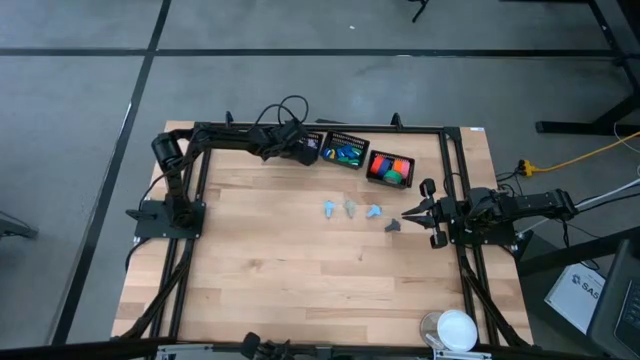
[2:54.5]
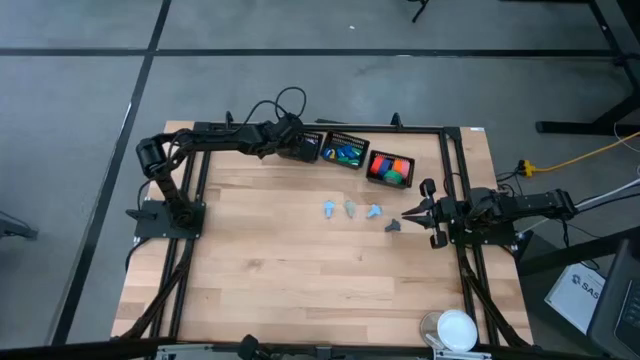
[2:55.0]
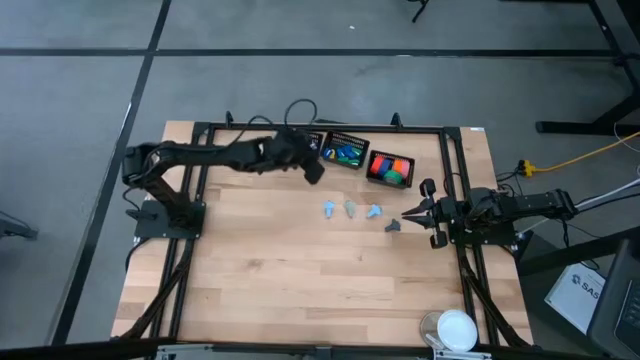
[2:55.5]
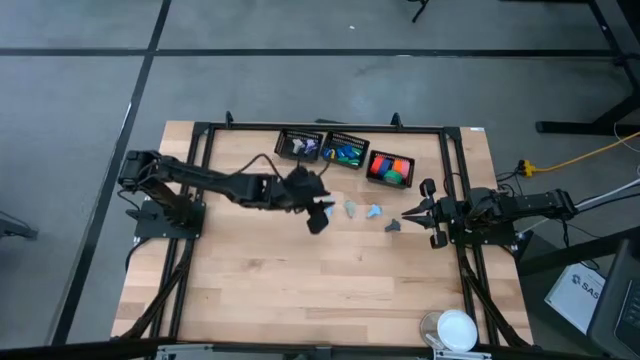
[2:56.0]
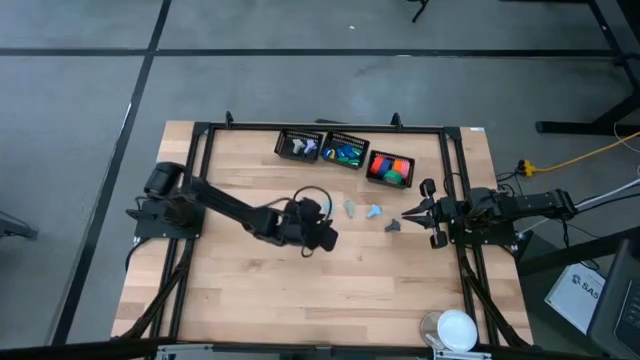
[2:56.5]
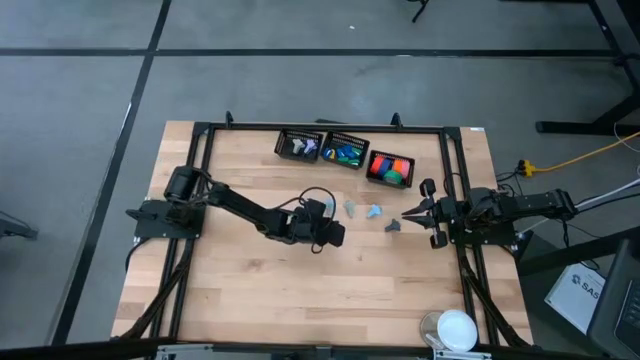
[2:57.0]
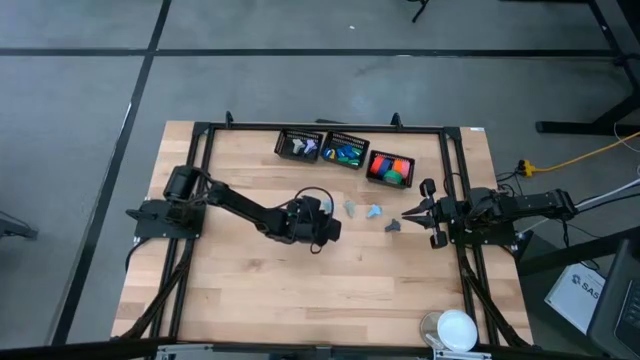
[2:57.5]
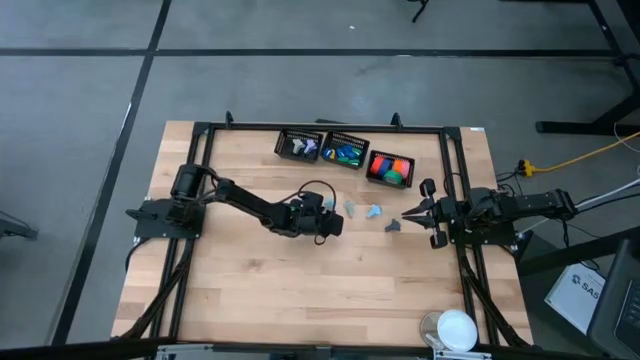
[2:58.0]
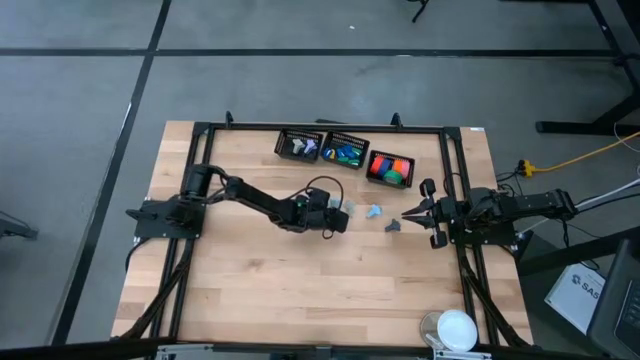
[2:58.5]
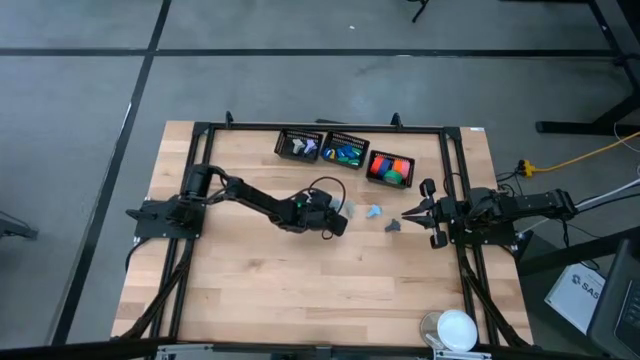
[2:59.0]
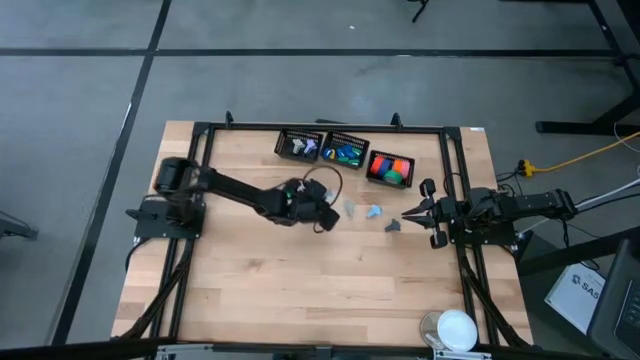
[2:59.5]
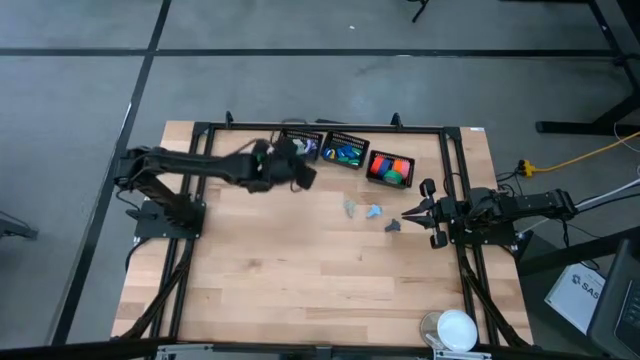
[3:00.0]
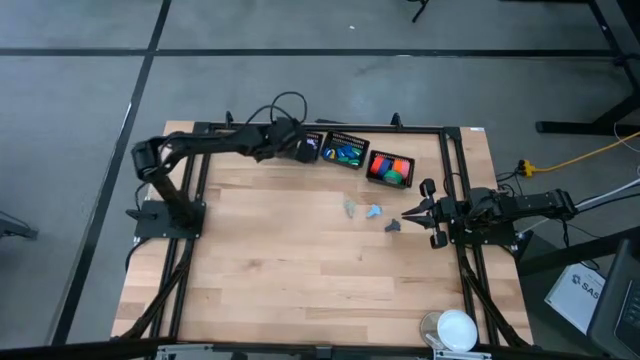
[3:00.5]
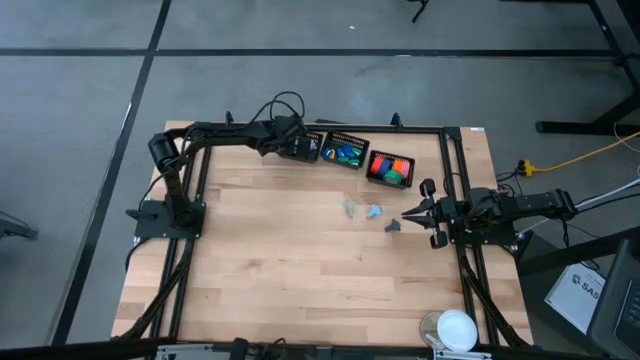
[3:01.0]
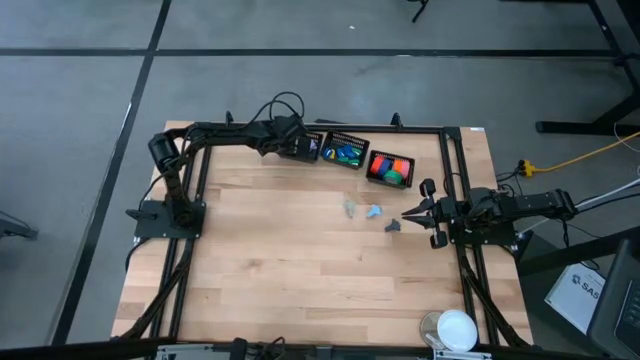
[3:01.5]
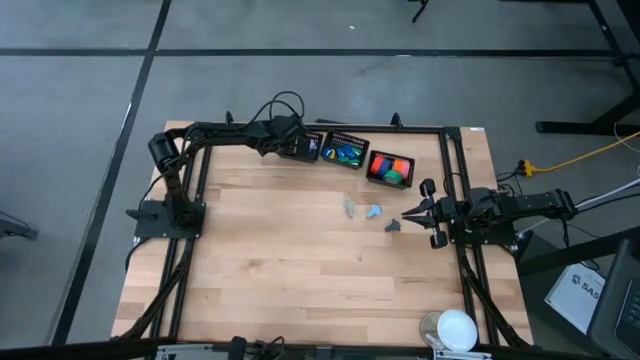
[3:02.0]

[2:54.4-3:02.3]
Task: Pick and place Stapler, Stapler remover, tape
Put the blue stapler remover into the left black bin

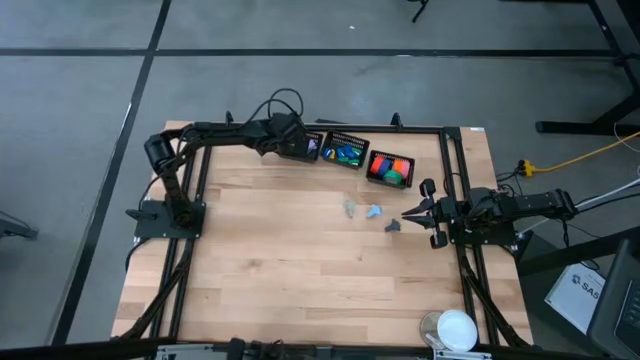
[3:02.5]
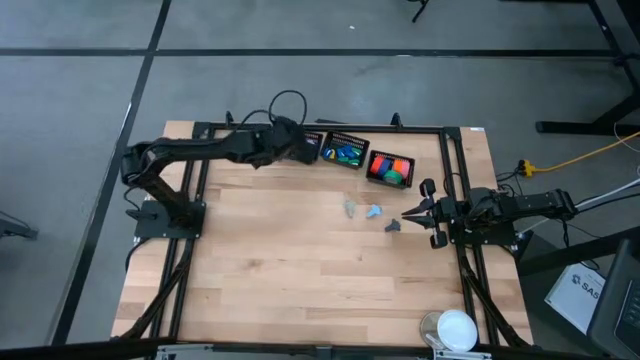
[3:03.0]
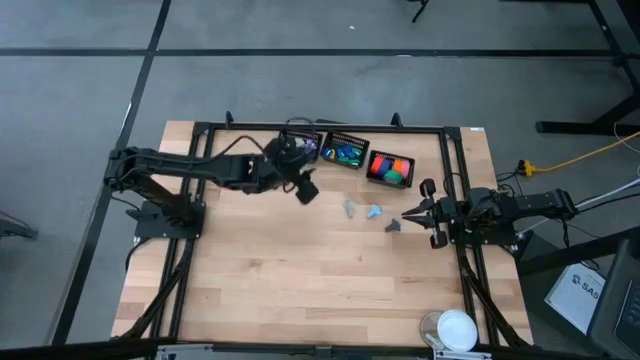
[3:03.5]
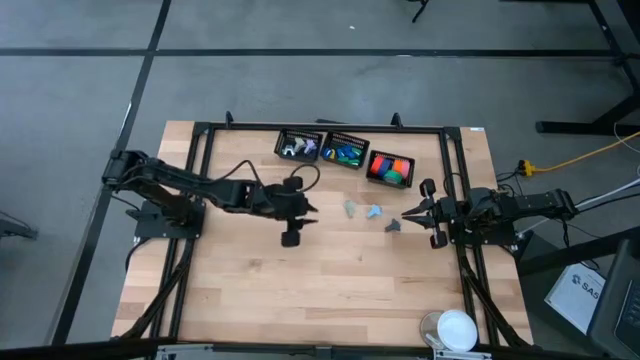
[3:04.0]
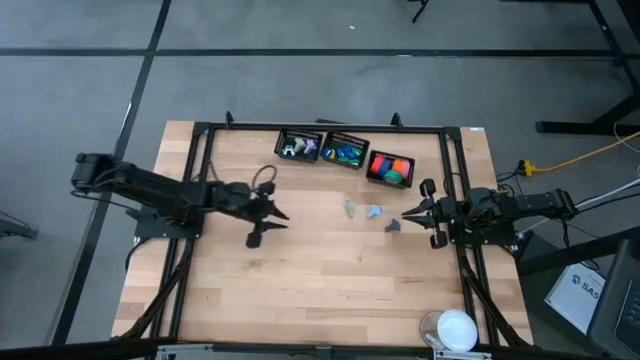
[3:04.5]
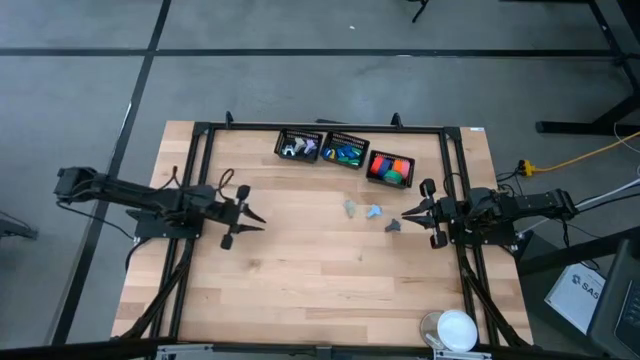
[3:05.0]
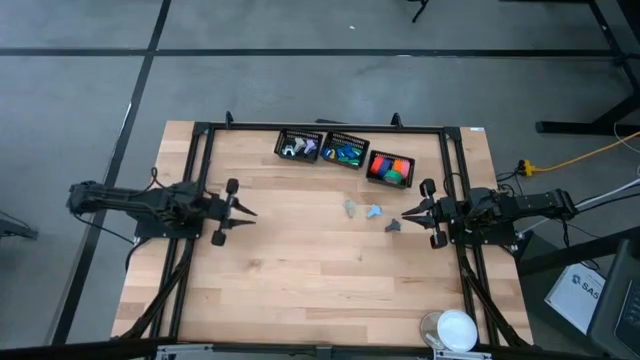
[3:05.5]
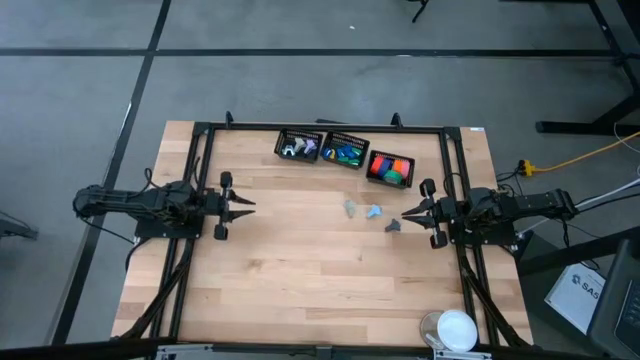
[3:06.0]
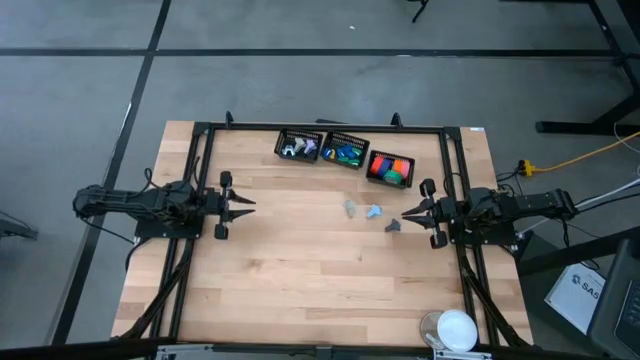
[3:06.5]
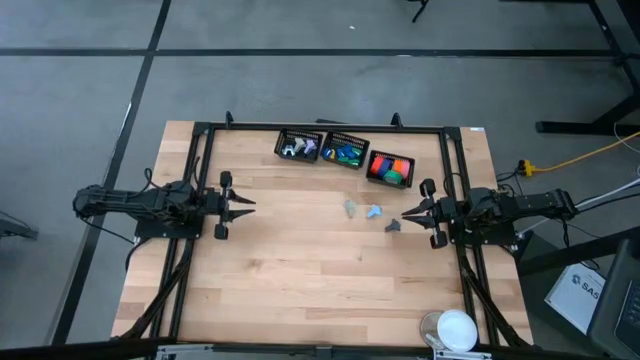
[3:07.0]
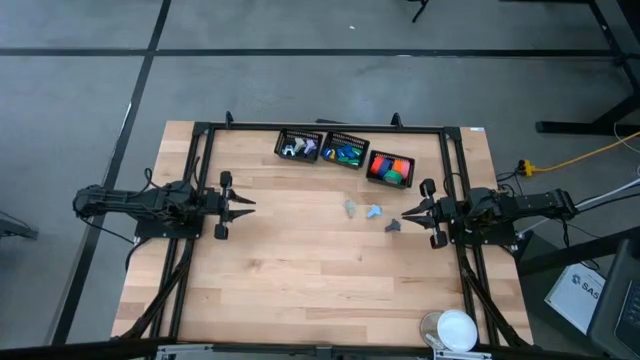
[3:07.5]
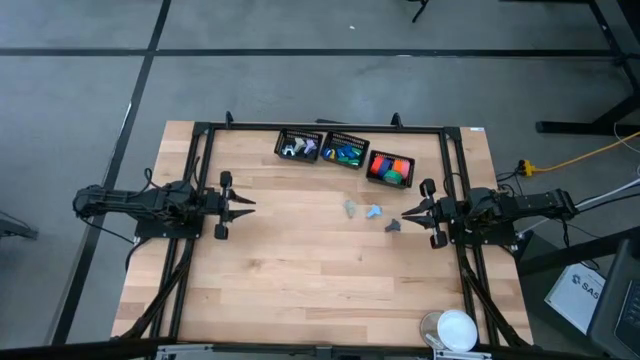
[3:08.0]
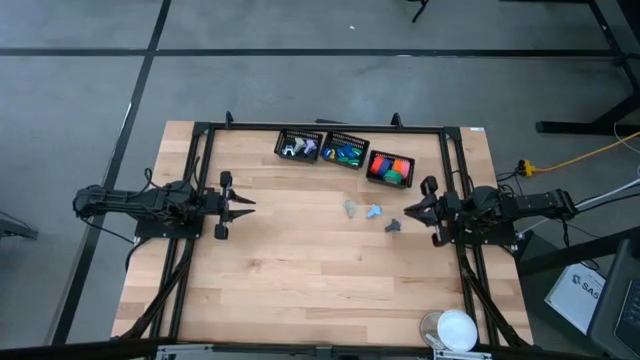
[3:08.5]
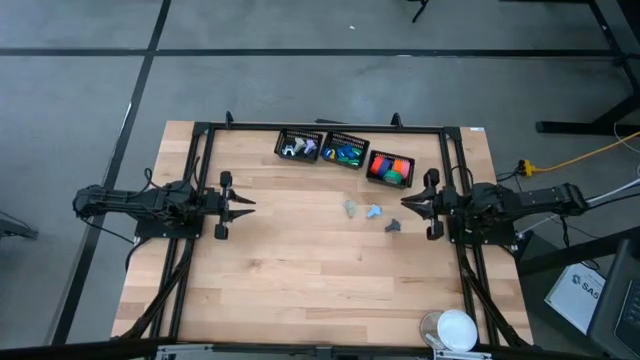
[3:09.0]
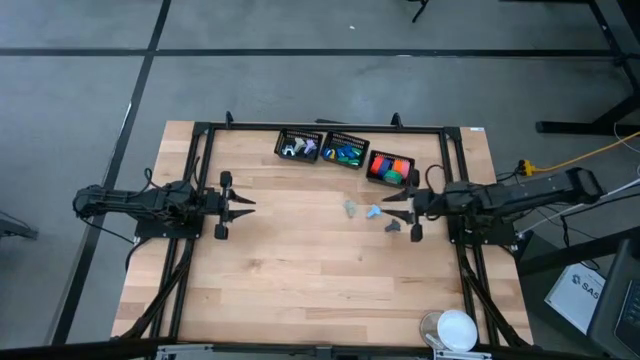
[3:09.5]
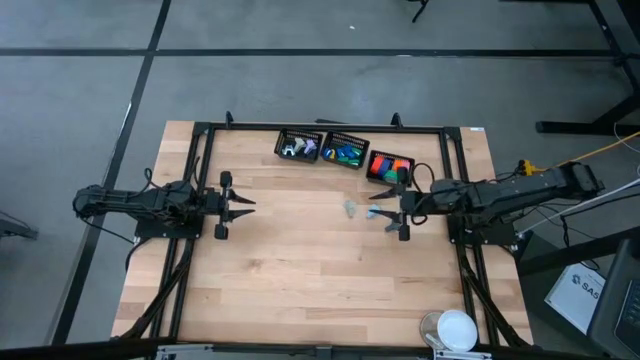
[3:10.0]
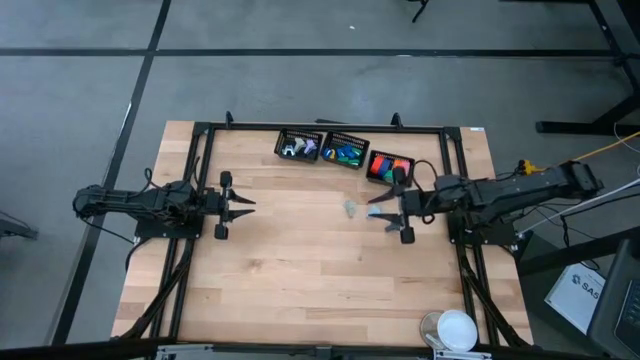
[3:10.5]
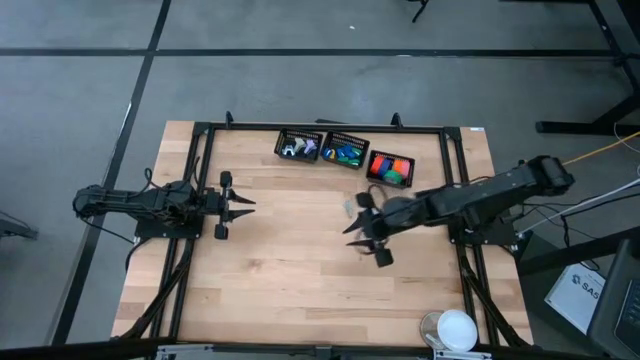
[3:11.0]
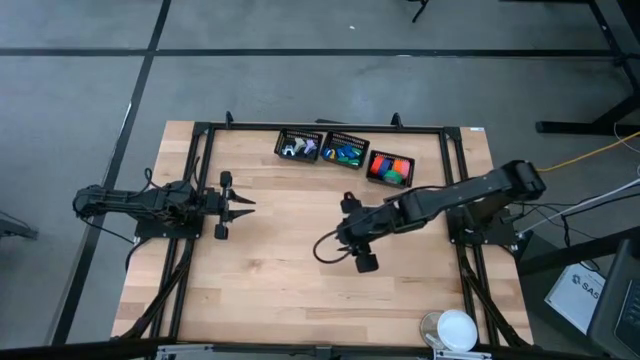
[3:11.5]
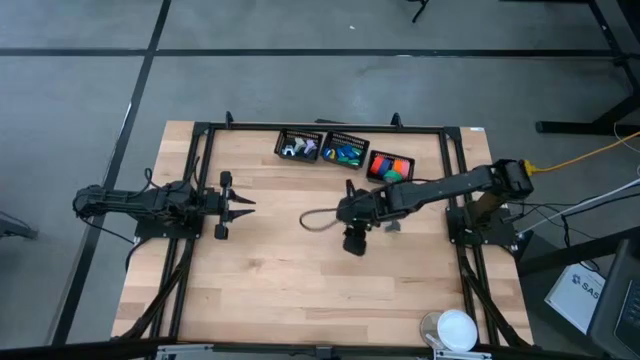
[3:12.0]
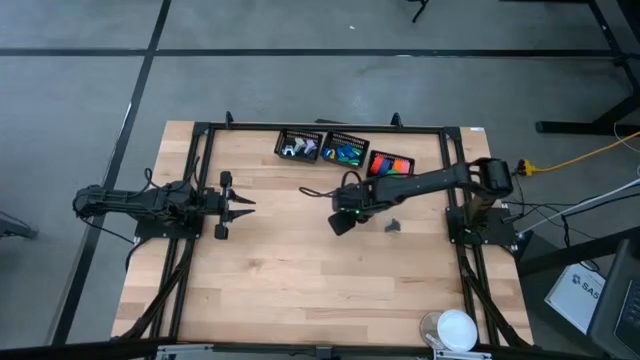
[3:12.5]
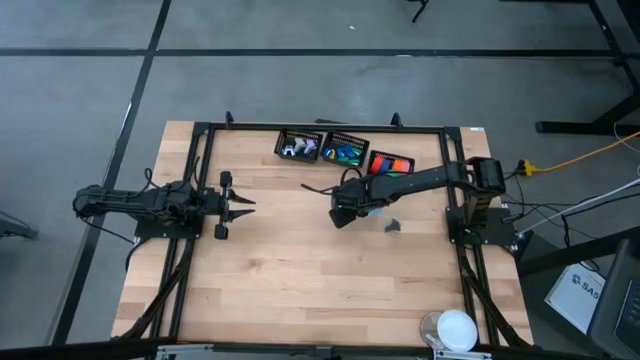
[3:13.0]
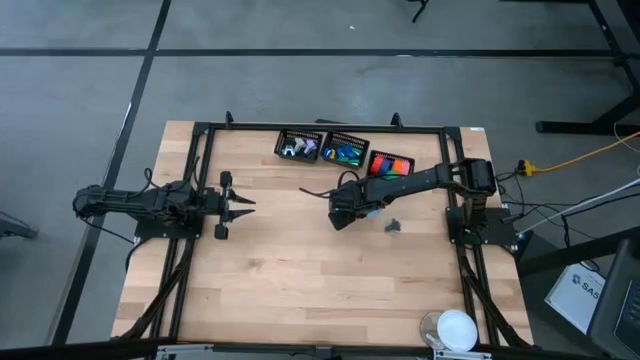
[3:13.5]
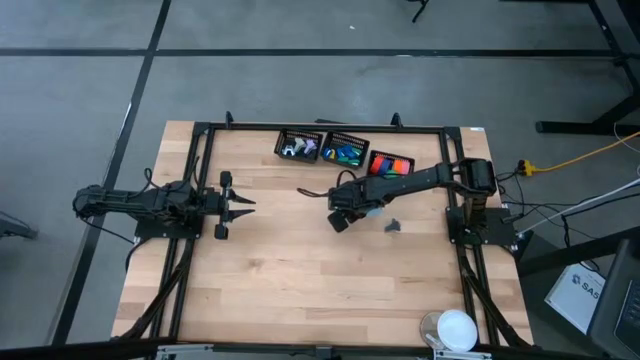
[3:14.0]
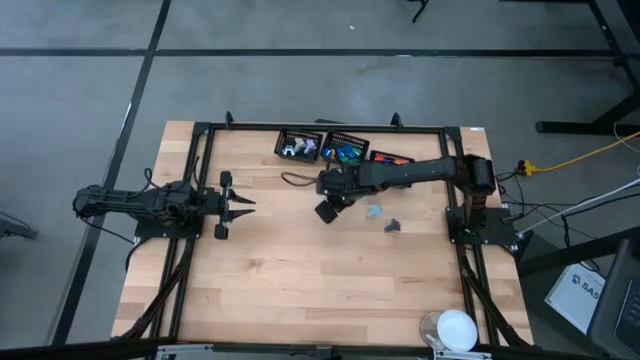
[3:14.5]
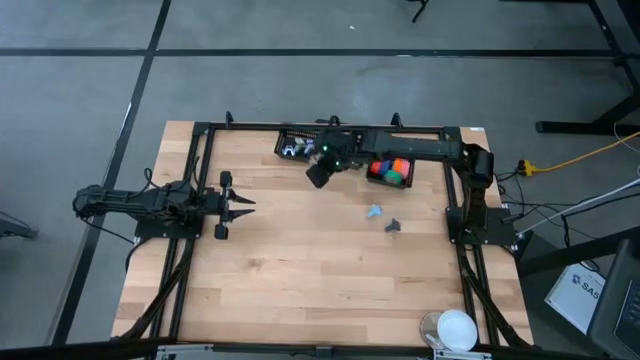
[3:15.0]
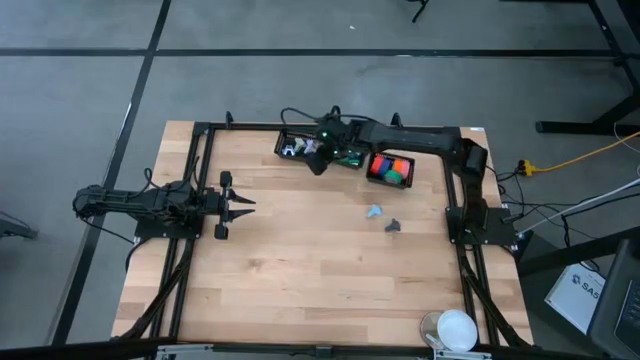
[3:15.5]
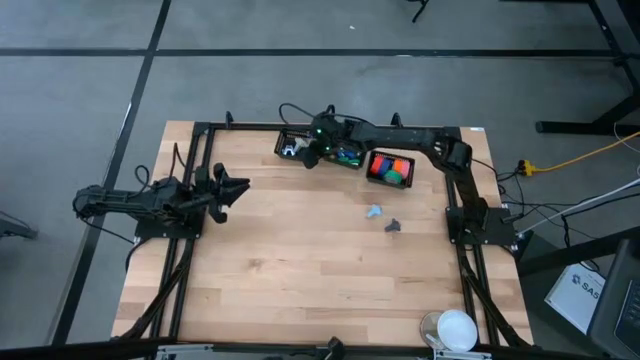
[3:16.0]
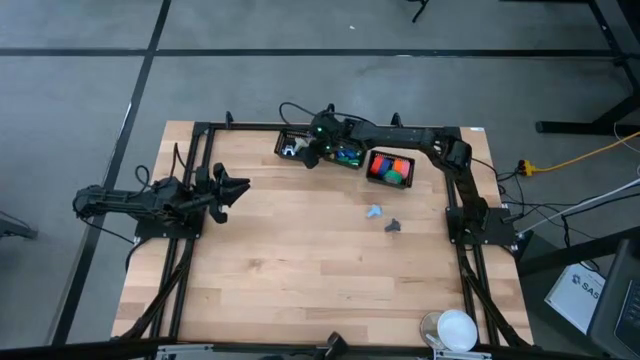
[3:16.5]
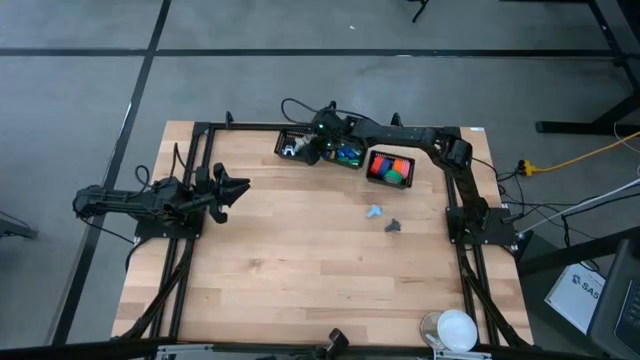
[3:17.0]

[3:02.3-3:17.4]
Put the gray stapler remover into the left black bin
